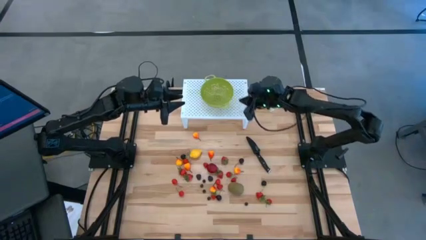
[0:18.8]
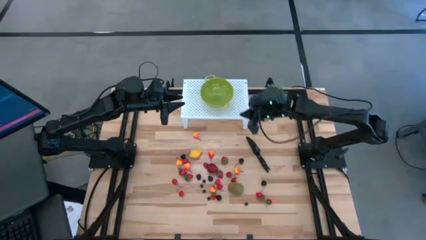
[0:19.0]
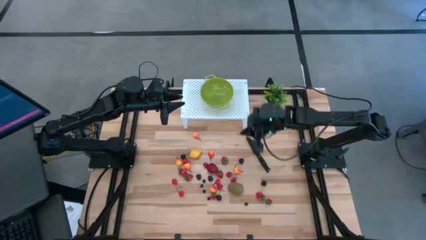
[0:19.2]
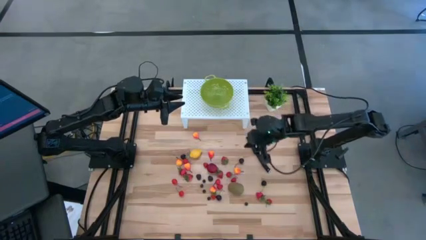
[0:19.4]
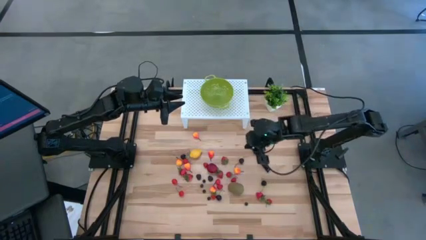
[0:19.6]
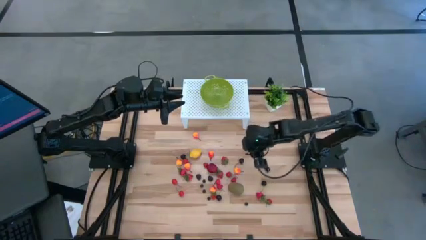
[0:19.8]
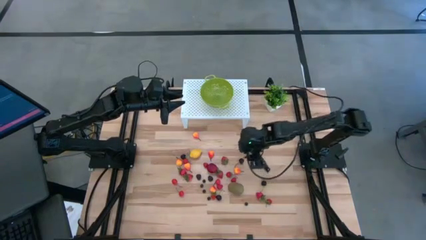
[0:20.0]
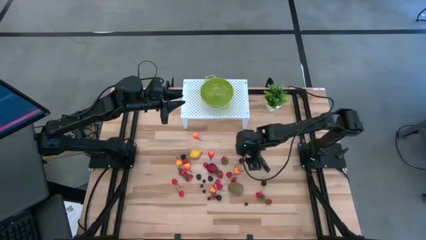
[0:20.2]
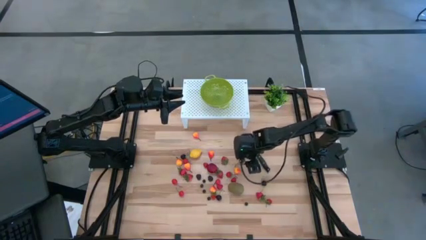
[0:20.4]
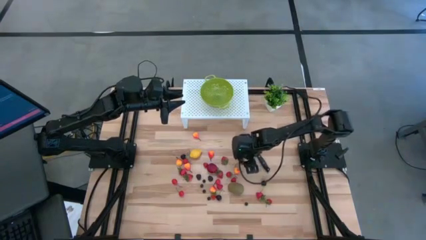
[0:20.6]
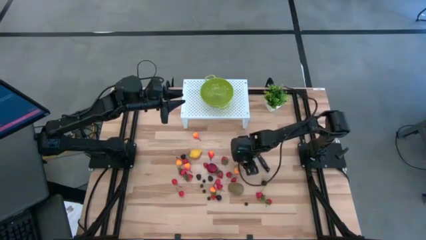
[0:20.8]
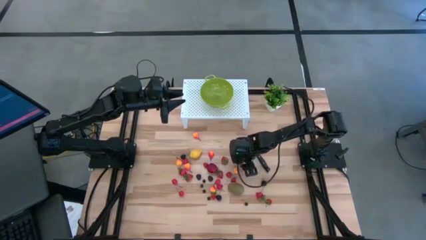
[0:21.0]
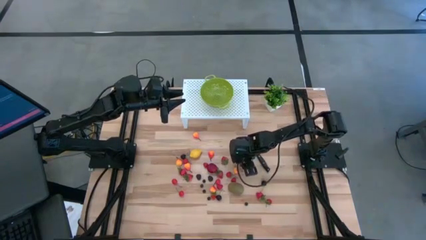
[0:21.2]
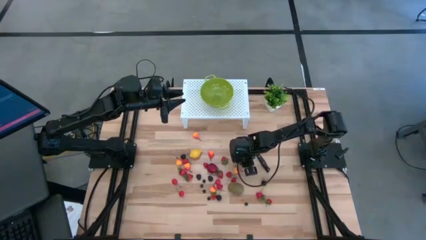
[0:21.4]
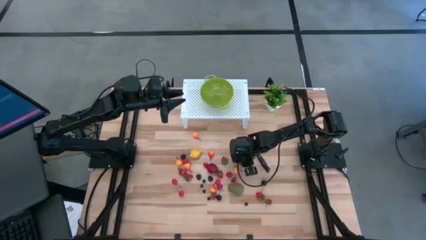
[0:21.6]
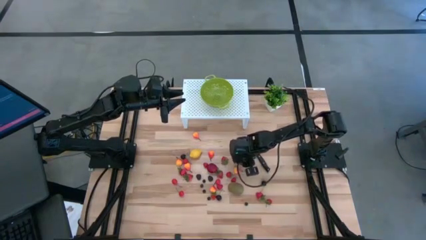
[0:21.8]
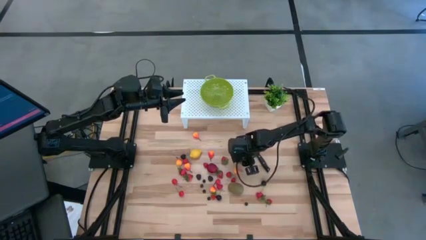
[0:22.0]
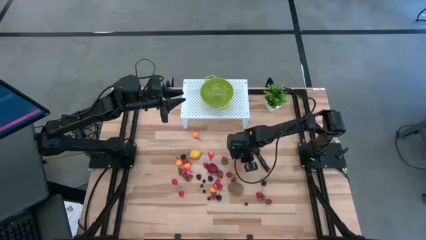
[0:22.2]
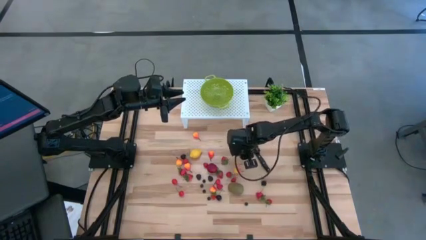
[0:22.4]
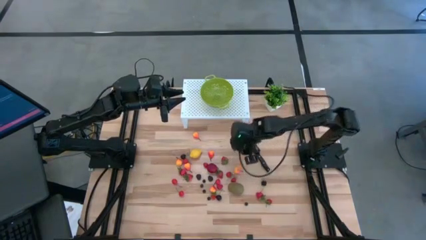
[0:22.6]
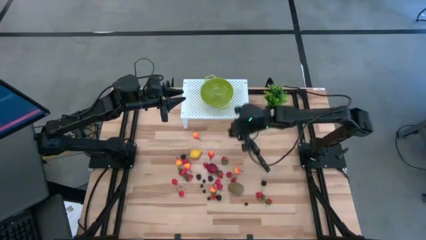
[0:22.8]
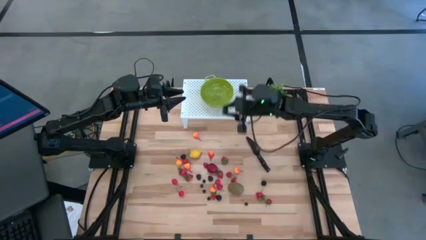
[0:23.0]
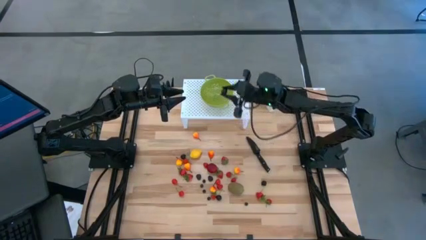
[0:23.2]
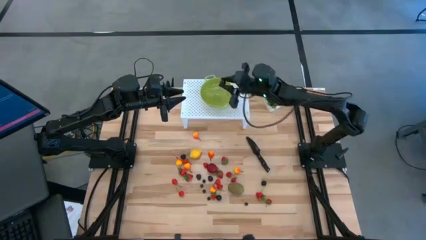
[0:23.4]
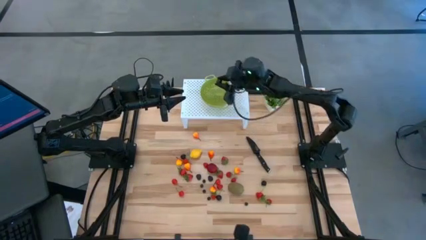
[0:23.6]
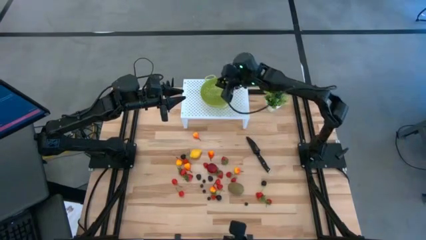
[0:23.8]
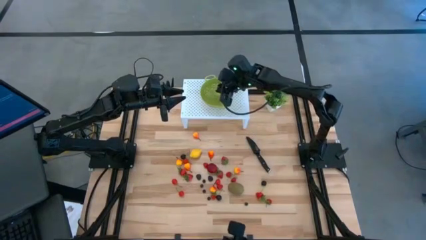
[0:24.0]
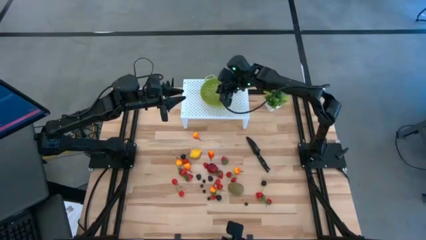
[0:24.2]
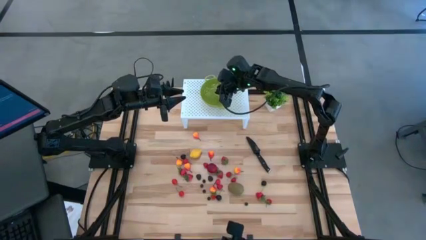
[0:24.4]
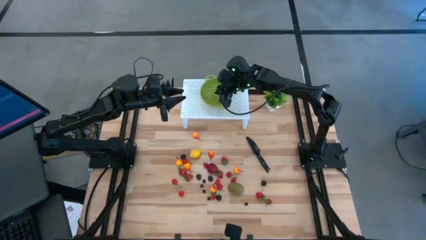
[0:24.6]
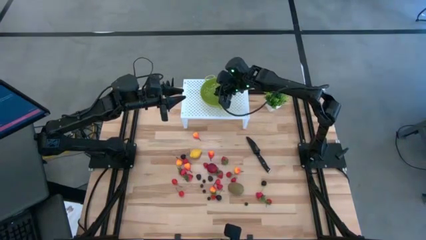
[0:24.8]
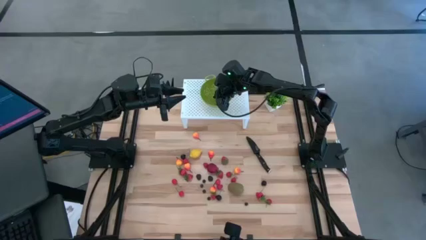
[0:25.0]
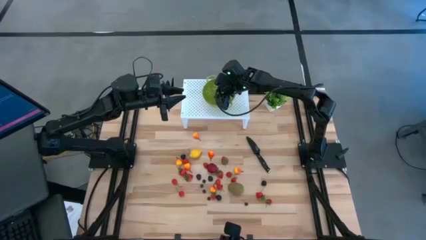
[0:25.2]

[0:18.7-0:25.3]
Task: Pick & Place Fruit
Put the black cherry into the green strainer bowl

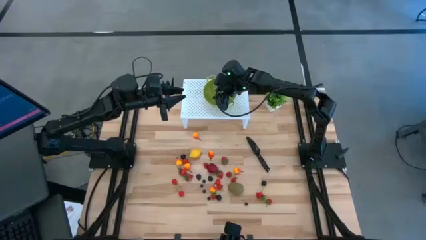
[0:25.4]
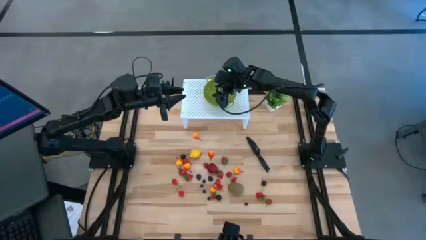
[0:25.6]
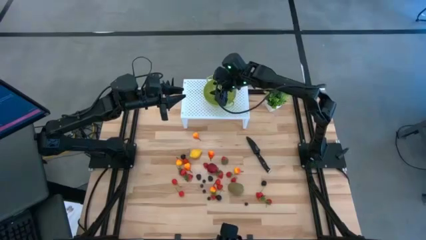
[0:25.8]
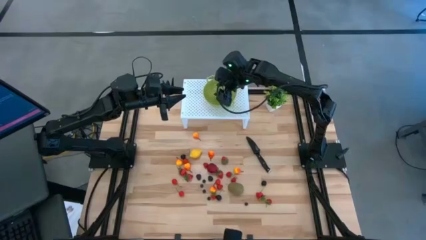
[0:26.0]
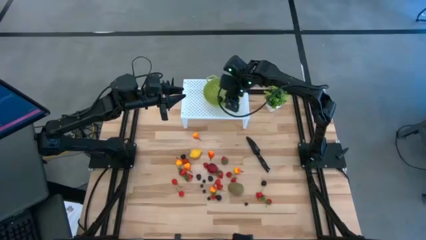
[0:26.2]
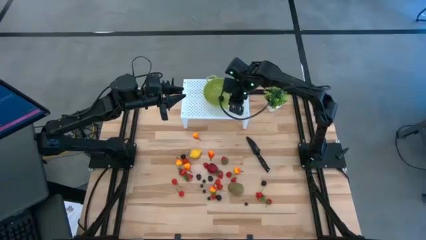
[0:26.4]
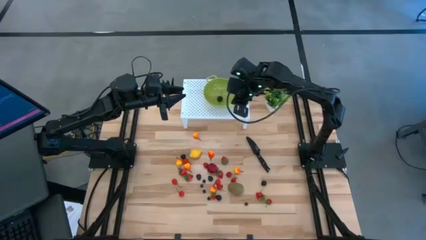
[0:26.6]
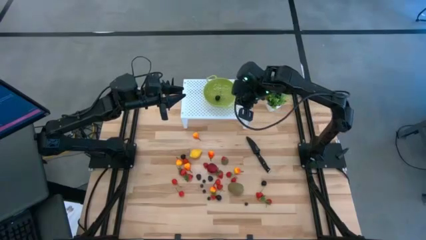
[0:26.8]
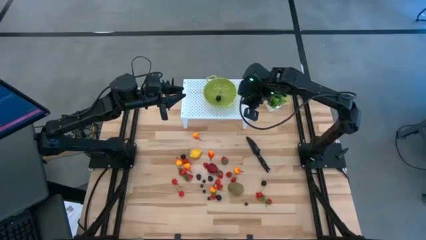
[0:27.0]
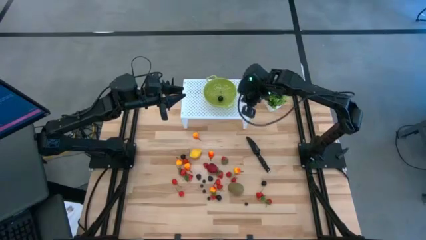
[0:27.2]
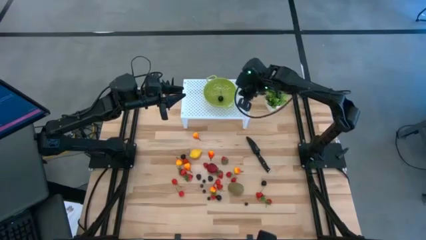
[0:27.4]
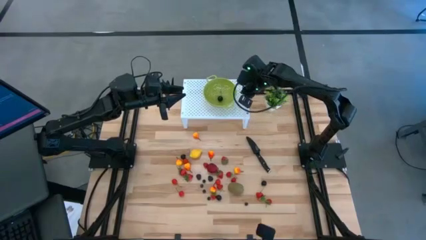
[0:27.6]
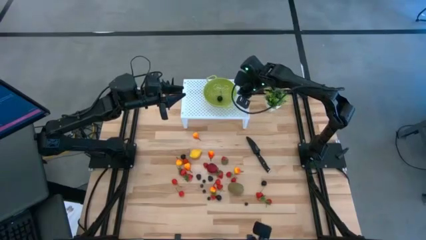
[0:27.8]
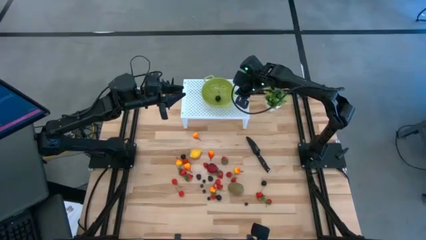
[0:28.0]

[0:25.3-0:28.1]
Adjust the green strainer bowl on the shelf

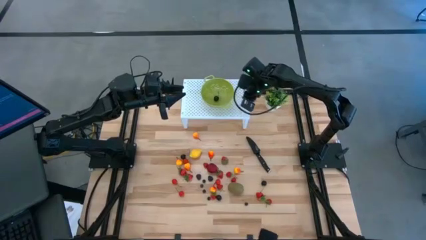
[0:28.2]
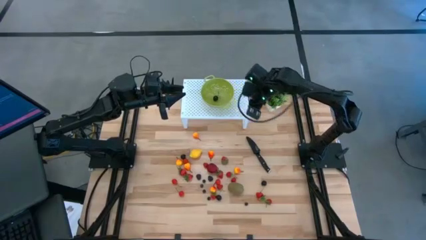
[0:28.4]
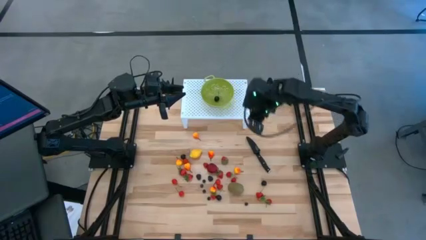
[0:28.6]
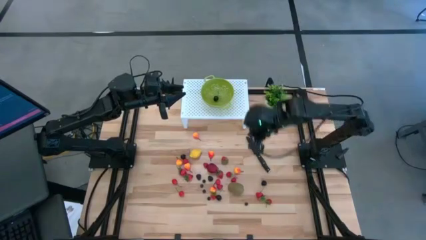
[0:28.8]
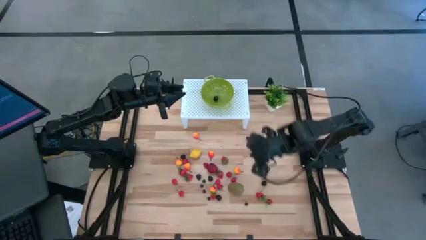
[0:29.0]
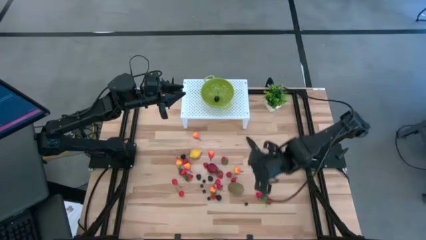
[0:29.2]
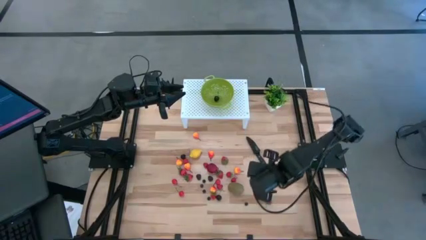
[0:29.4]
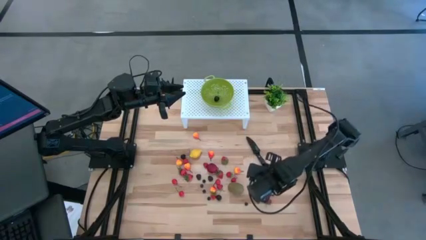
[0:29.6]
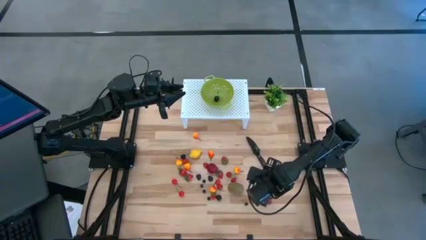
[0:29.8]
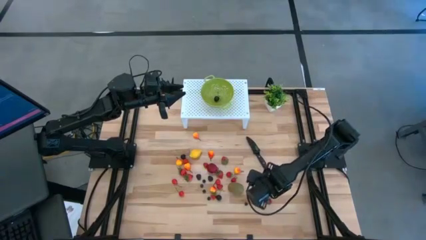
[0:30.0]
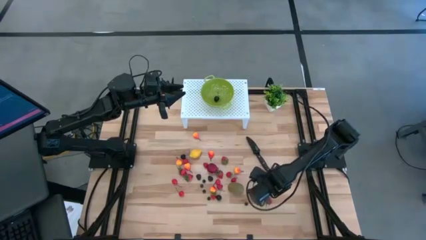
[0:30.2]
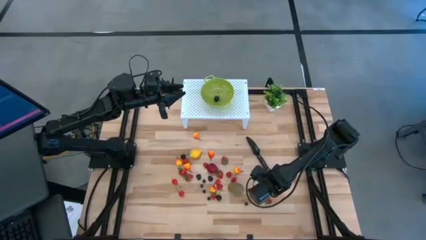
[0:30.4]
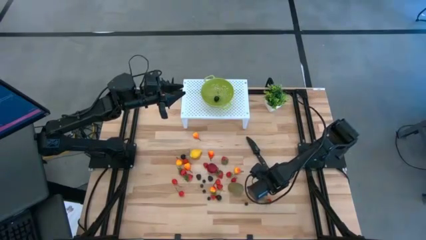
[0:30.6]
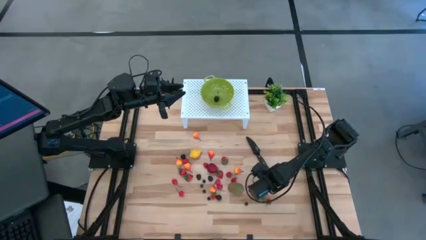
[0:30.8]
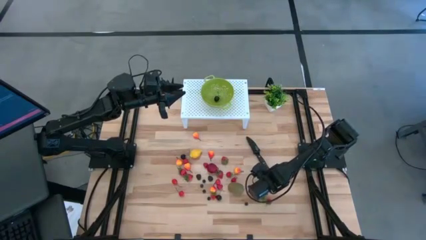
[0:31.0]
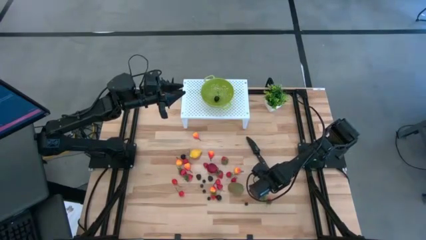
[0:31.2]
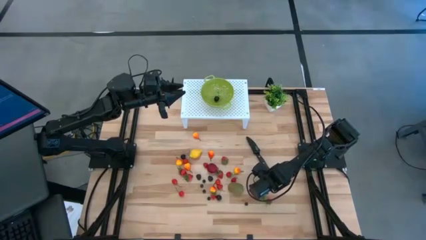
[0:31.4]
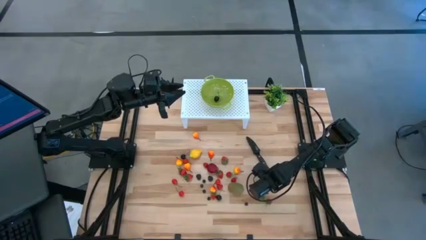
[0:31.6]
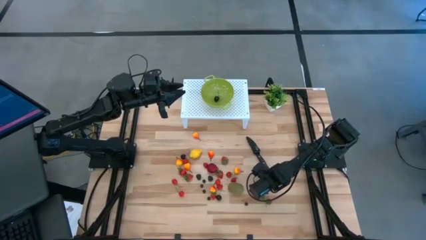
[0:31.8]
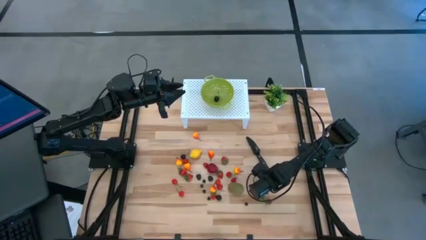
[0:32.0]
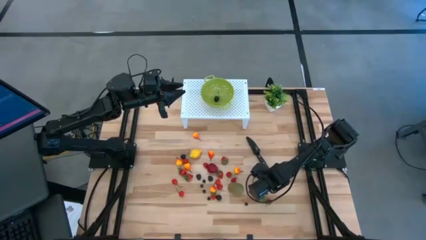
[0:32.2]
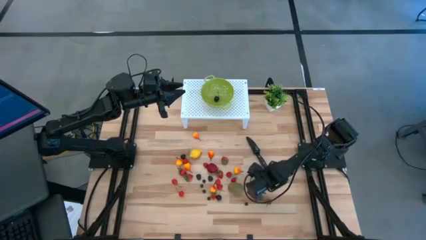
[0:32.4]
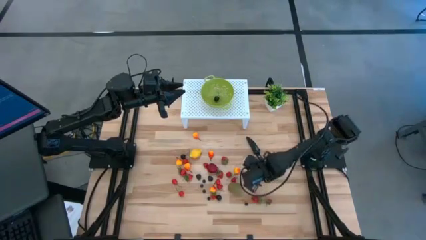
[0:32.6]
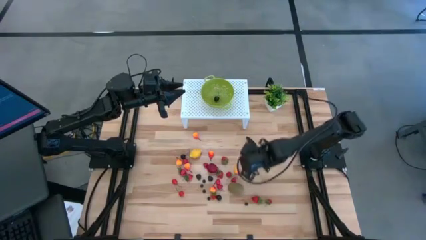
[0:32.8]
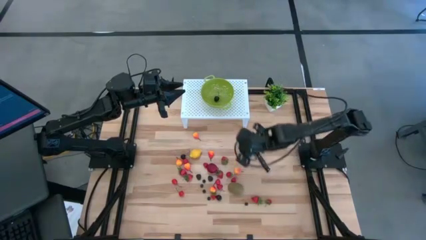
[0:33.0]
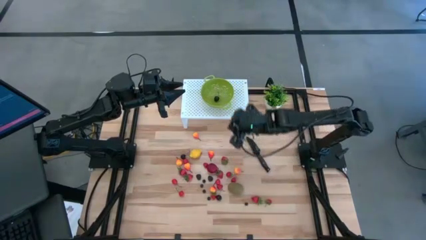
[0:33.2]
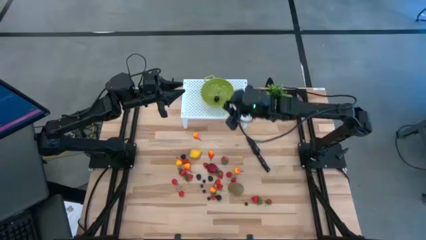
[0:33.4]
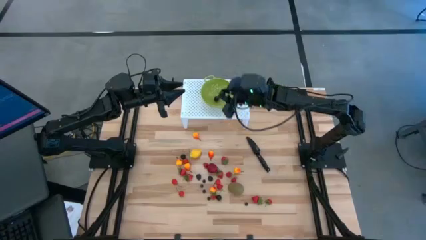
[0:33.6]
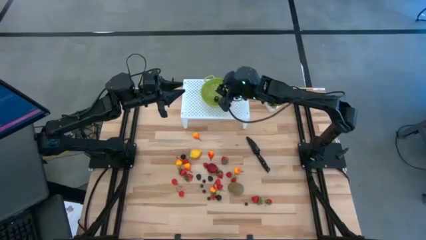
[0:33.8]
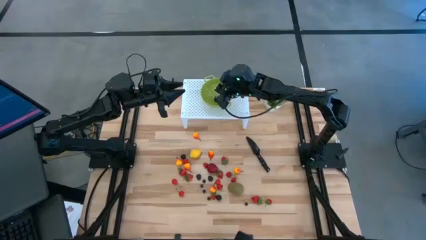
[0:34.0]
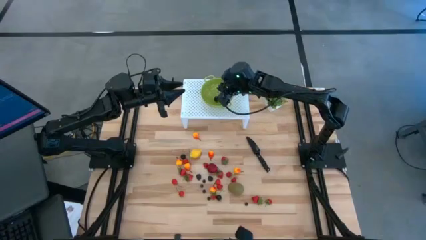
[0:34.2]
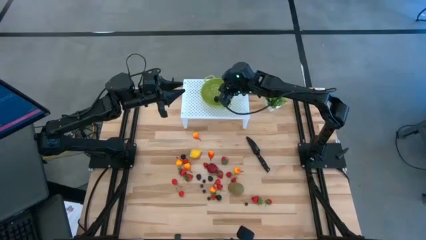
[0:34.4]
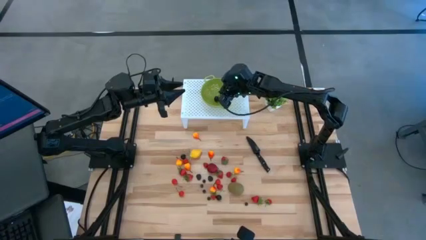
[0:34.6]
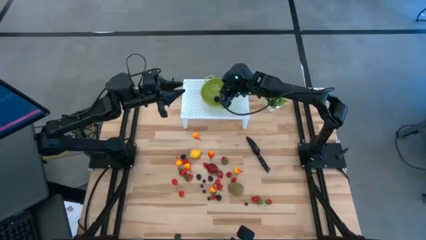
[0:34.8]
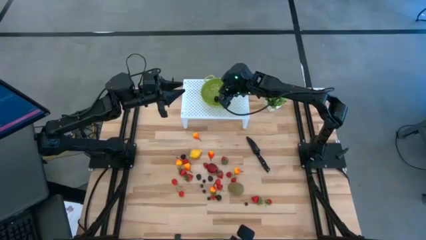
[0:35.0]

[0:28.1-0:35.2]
Put the black cherry into the green strainer bowl
